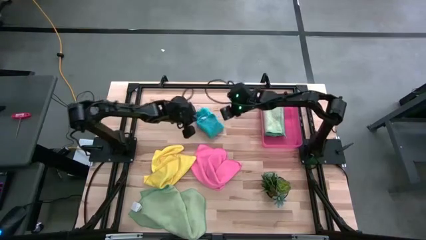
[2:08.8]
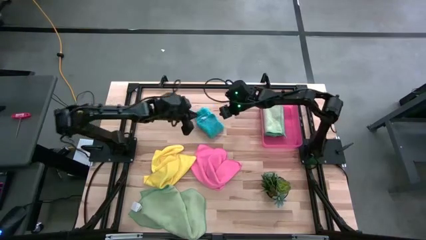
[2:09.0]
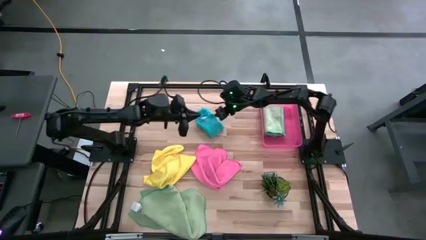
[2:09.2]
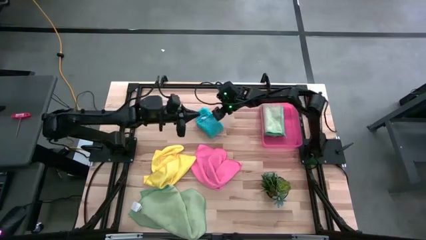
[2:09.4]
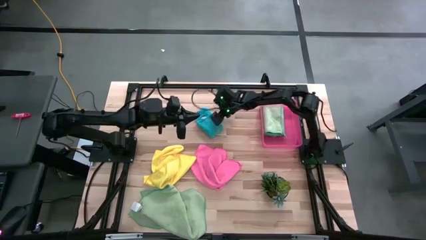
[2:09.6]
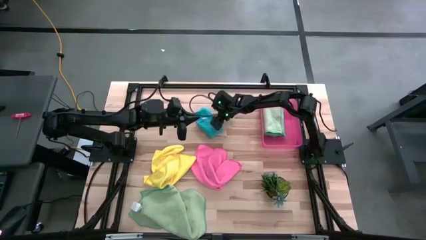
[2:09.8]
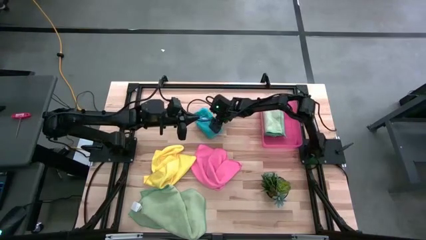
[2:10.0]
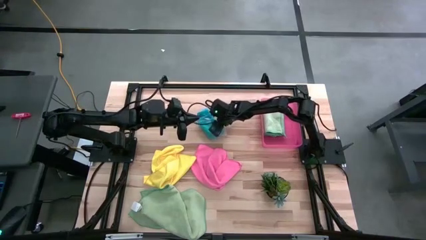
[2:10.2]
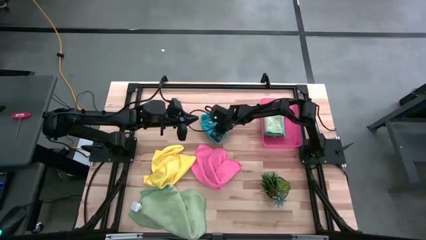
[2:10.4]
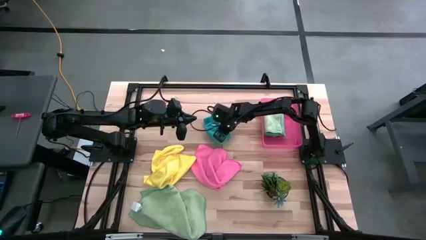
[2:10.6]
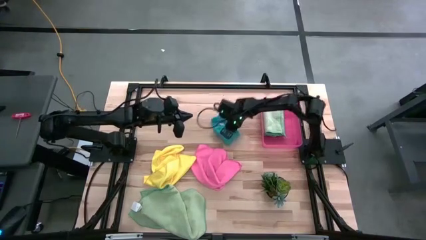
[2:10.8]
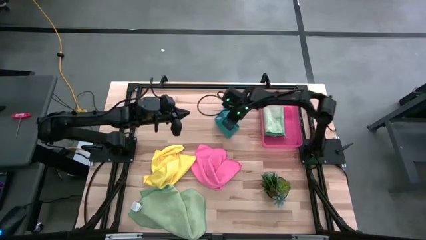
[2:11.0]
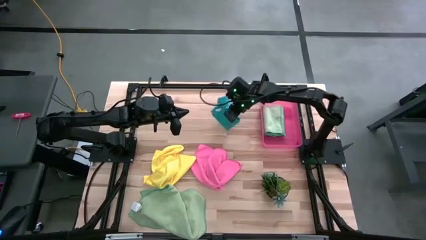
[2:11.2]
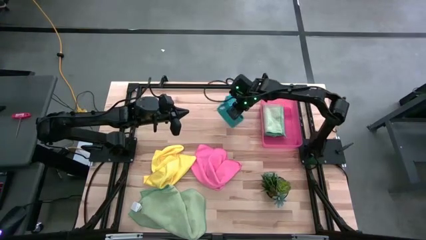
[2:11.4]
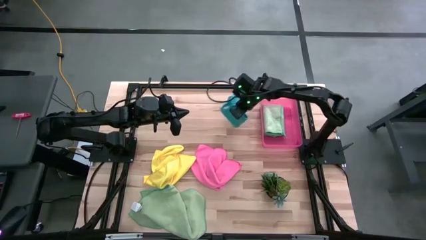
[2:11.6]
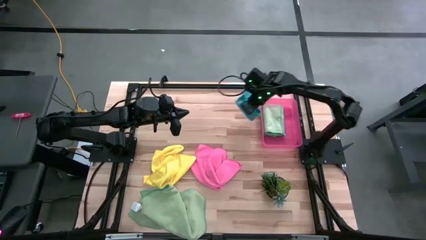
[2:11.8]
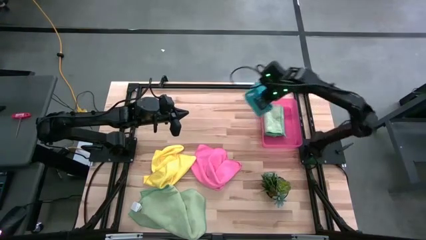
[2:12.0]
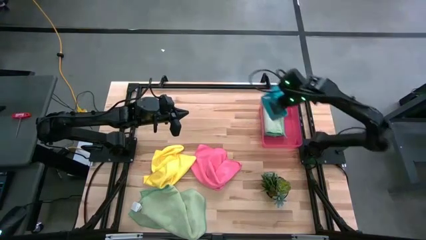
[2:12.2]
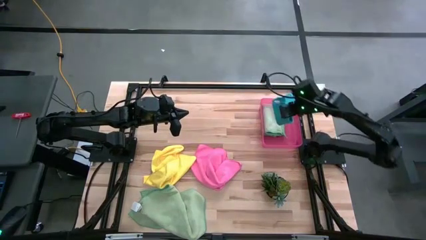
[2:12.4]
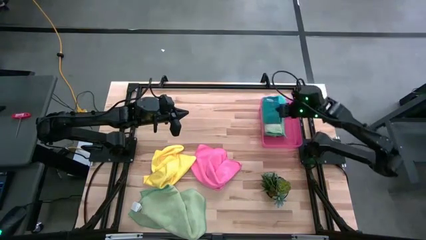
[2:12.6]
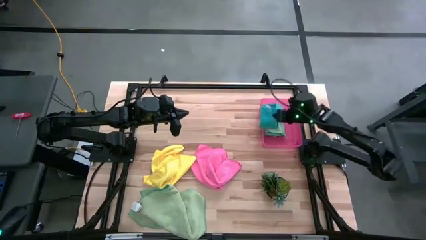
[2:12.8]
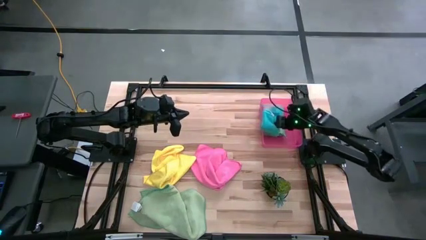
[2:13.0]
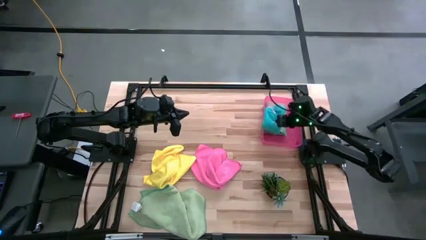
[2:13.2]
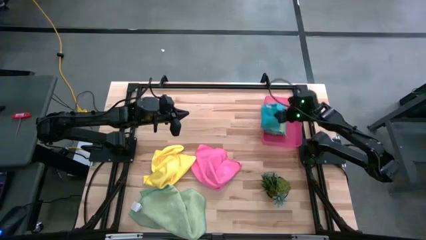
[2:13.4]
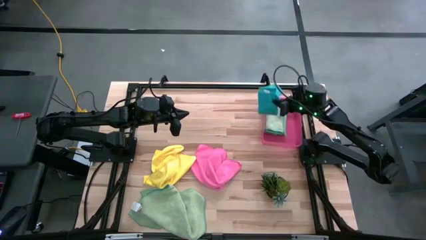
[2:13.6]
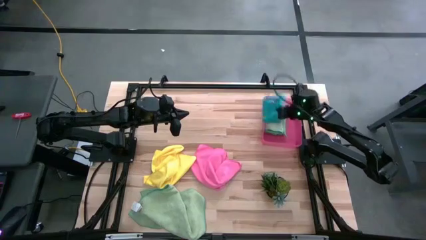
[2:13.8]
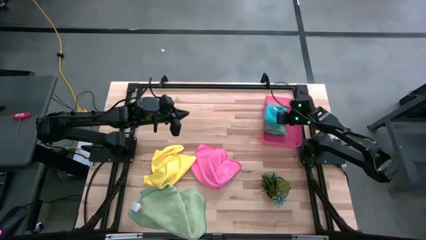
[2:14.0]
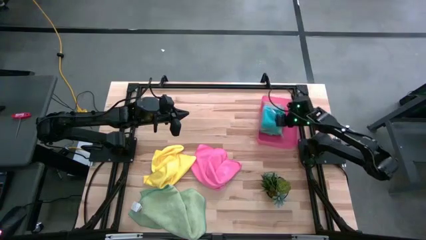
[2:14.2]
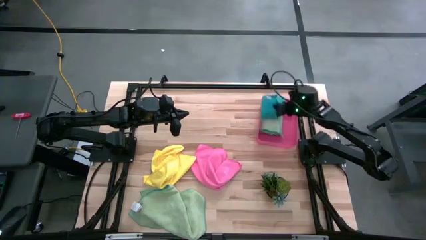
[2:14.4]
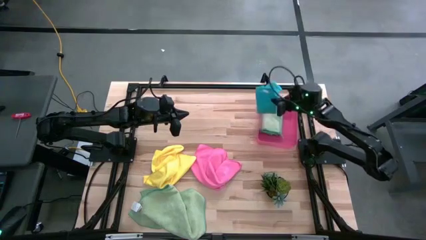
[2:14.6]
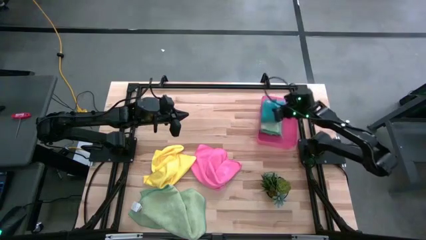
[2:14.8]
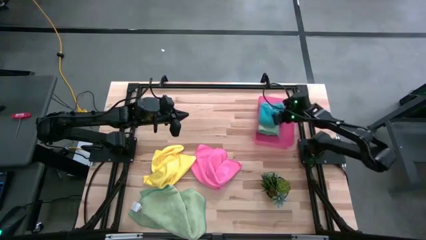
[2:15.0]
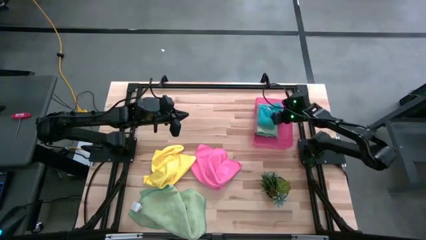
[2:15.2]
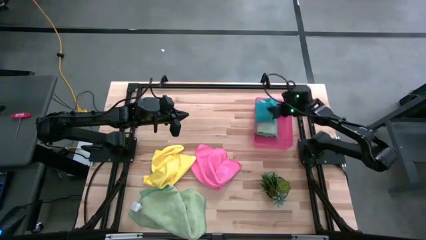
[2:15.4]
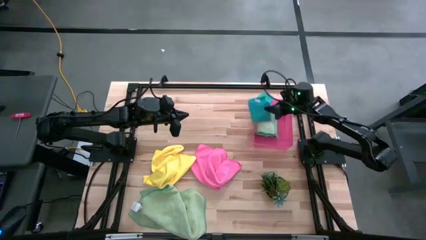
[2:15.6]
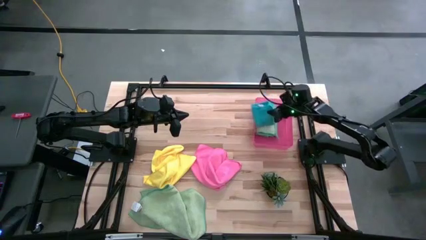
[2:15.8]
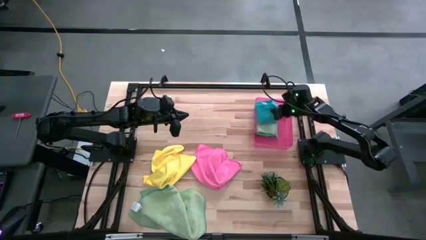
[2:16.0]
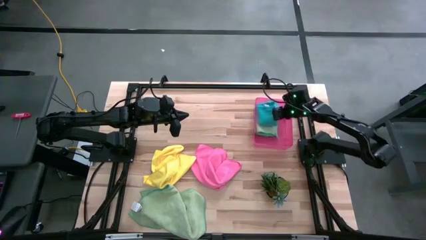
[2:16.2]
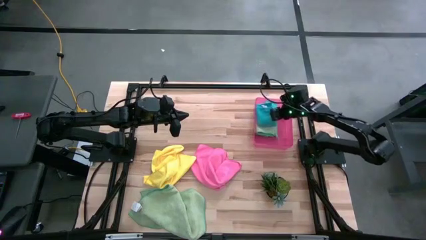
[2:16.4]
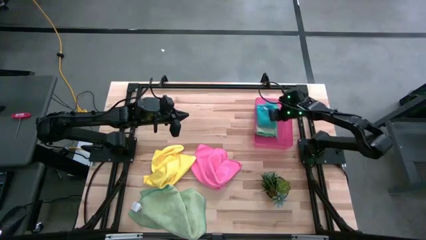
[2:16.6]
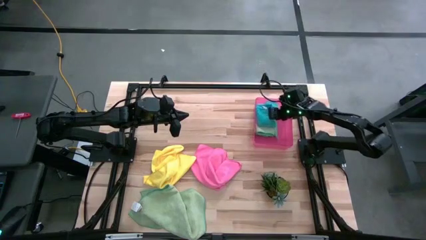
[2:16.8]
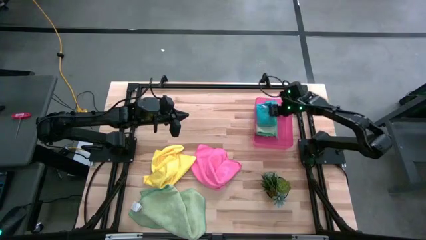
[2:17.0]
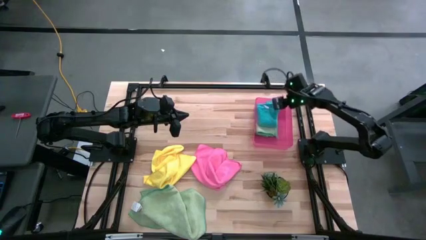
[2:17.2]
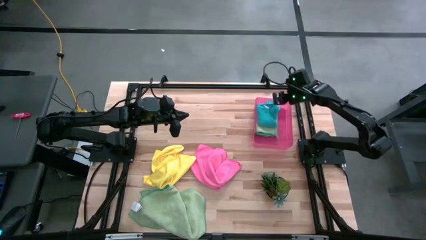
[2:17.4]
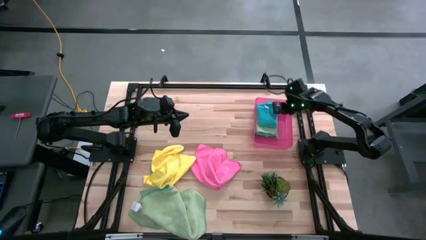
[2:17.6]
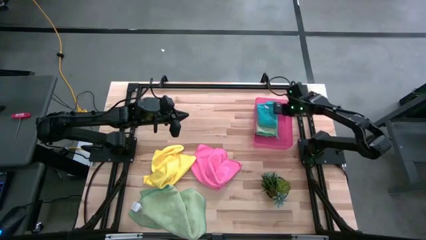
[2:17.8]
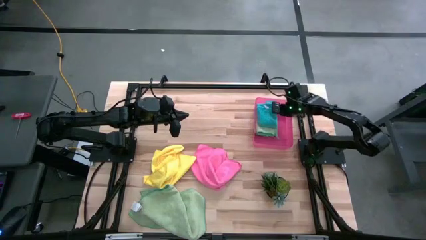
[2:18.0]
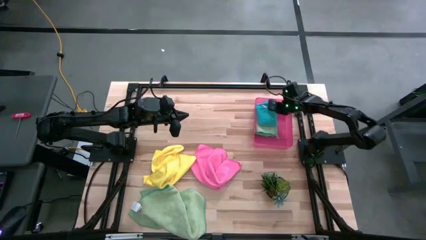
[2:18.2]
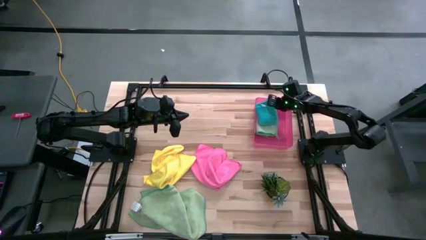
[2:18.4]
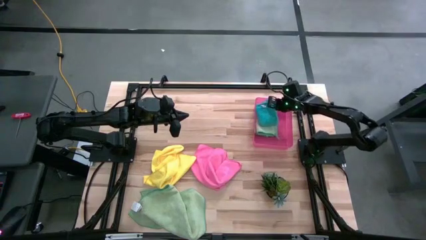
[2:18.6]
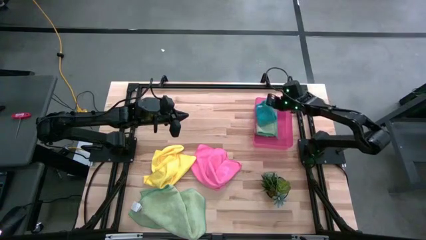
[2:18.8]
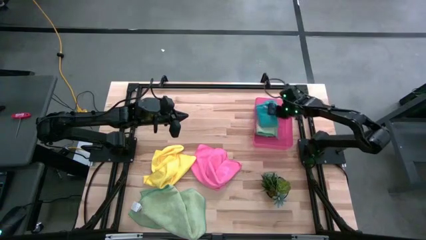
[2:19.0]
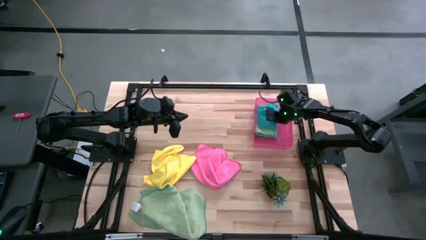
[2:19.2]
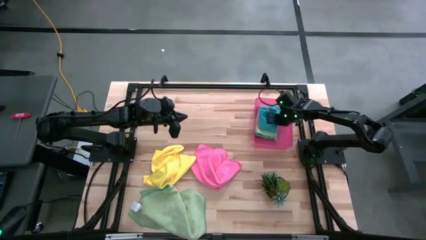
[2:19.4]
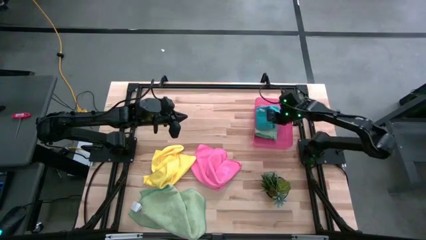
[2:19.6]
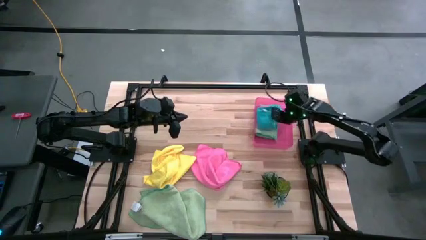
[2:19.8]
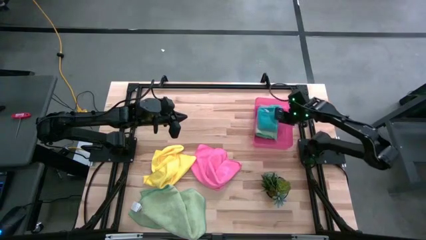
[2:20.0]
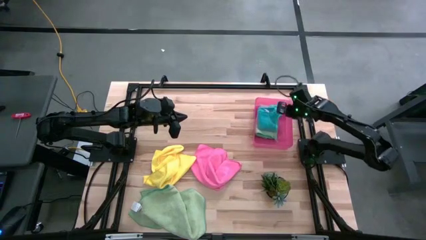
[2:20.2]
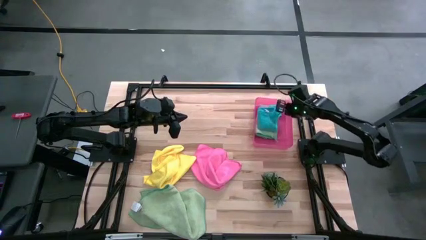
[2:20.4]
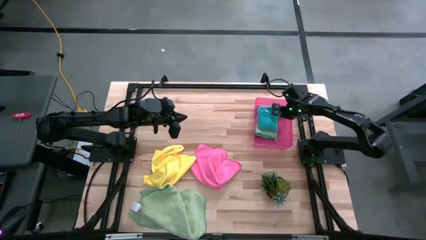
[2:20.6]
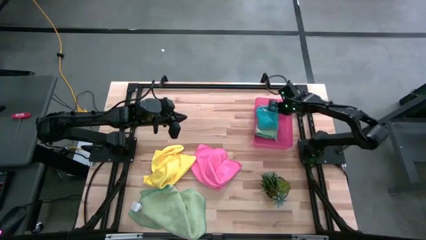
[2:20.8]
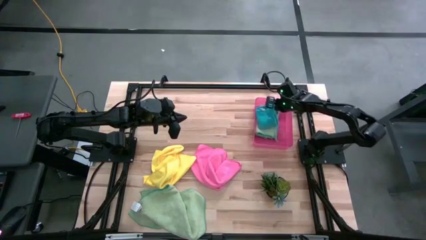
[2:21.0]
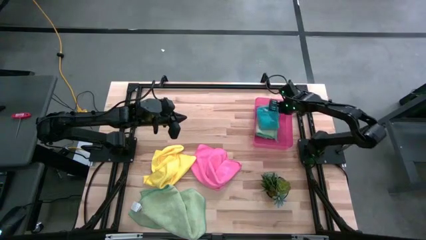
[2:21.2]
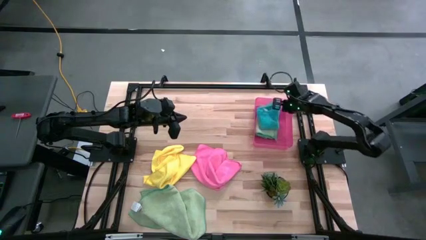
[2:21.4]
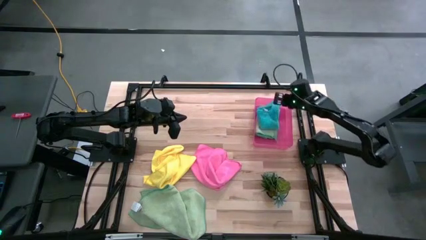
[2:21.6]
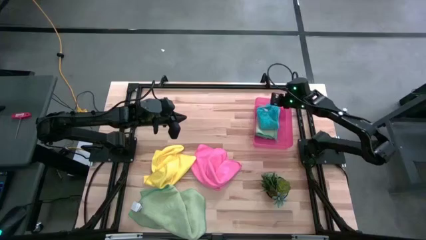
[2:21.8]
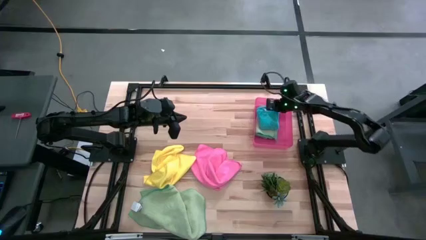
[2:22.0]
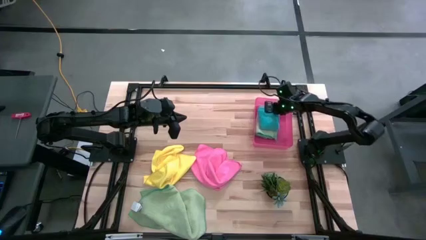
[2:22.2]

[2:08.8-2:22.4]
Task: Fold microfiber towels
Put the folded blue microfiber cloth into the red bin

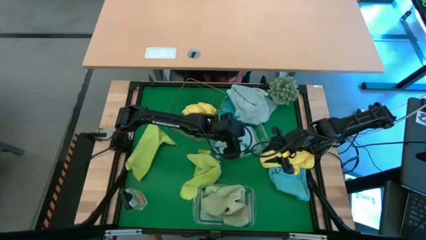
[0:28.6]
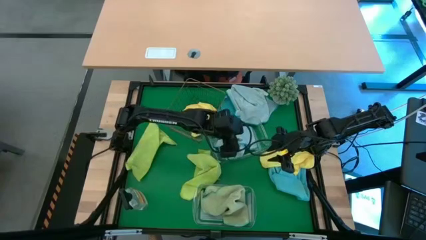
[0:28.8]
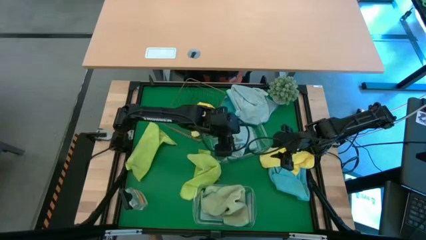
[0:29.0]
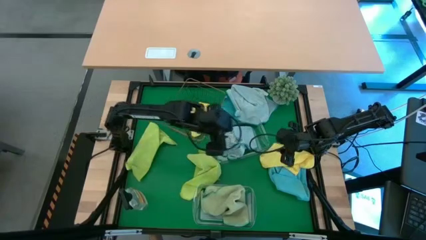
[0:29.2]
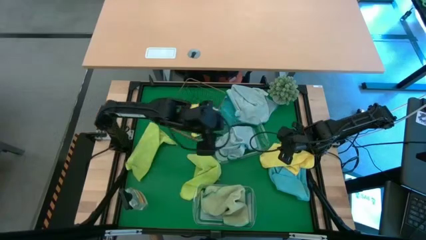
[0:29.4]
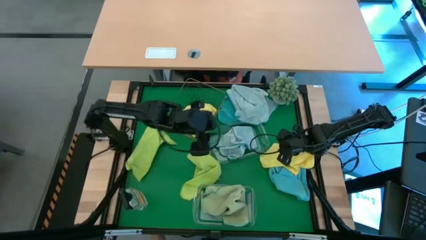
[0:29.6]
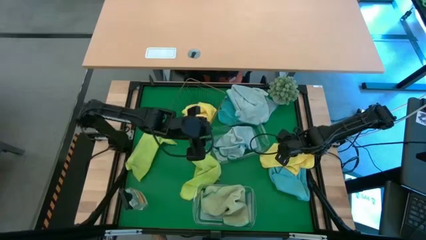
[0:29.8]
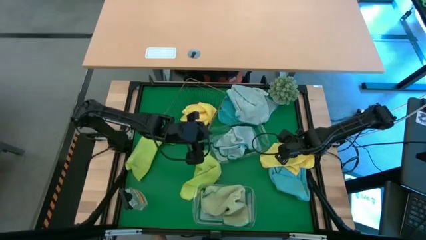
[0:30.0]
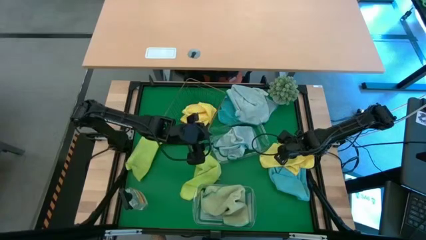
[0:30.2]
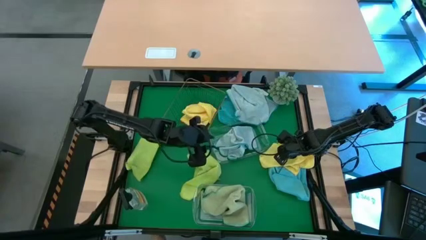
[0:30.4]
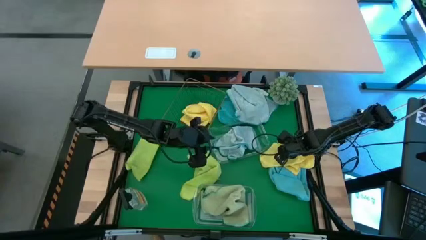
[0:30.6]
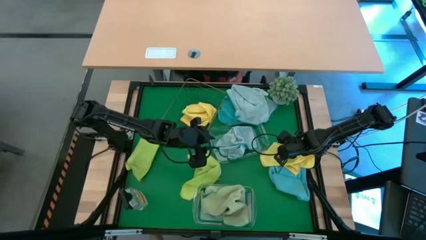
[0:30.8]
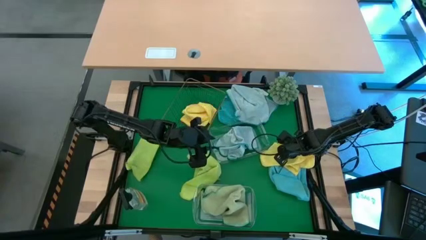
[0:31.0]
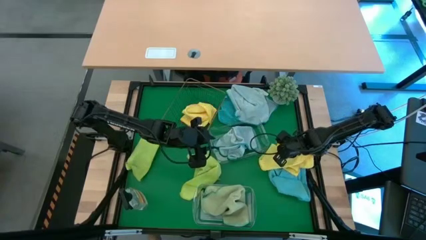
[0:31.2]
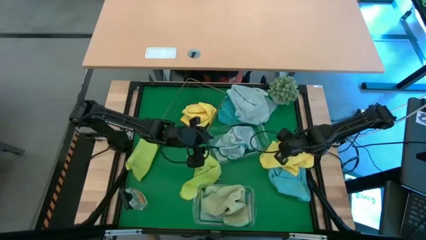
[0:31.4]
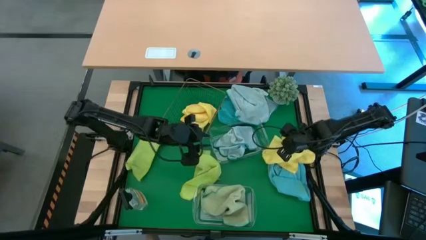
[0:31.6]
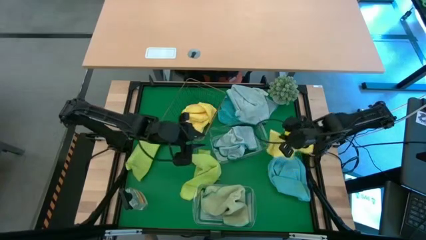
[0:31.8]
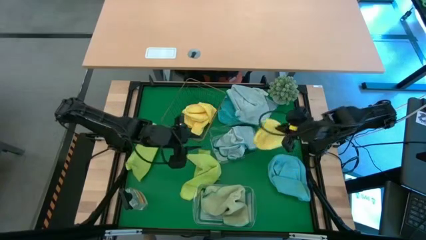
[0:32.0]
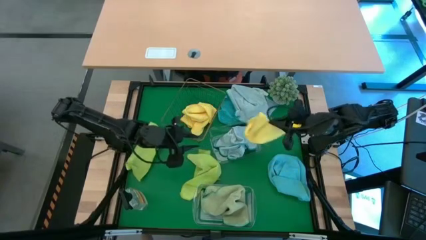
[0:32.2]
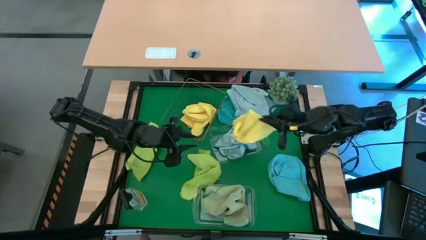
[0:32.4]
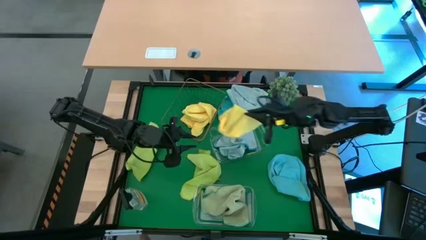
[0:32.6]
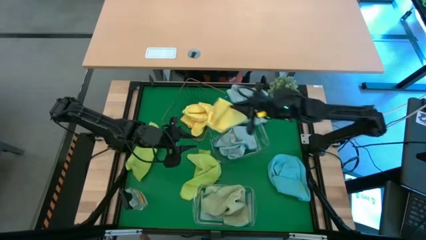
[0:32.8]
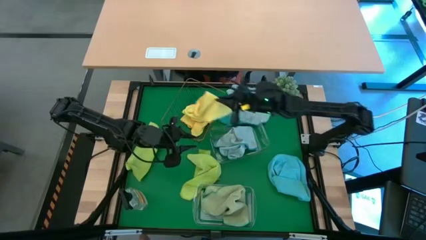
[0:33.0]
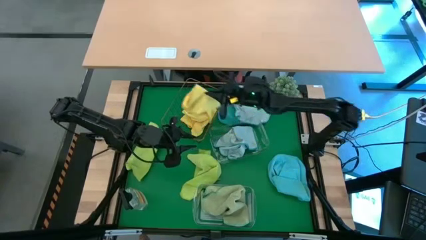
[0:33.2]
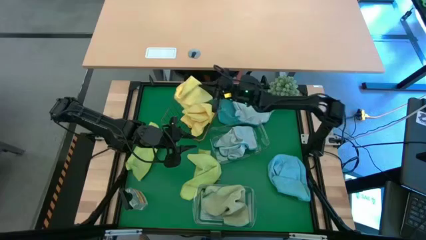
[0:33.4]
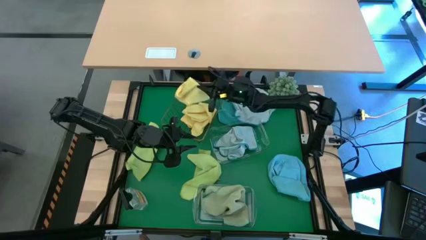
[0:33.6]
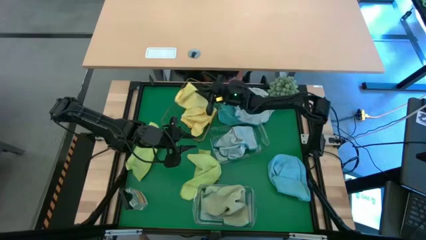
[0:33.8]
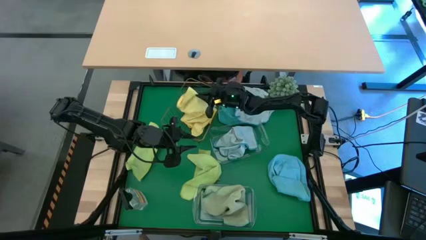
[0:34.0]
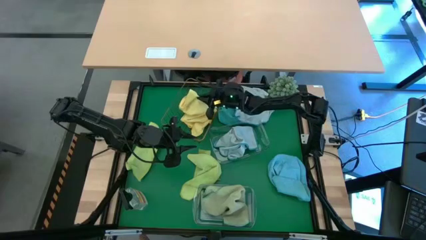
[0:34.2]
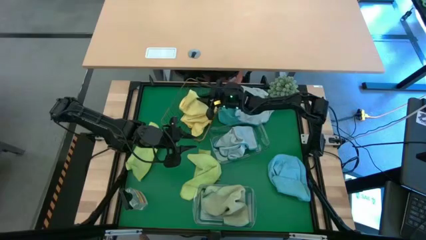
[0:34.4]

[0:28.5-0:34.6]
Task: Sort microfiber towel by color & place in baskets
Put the yellow towel into the gold wire basket
